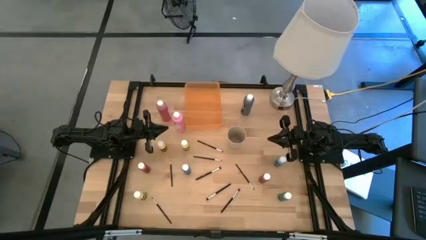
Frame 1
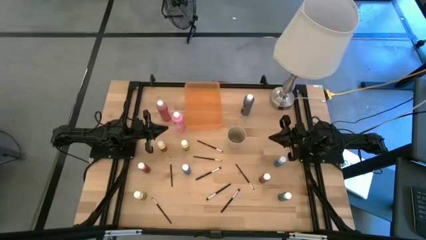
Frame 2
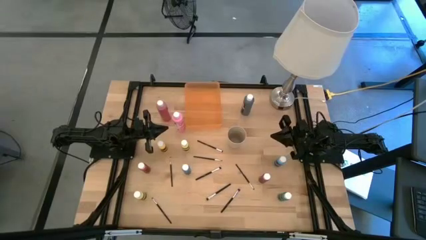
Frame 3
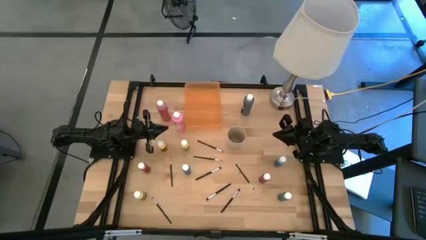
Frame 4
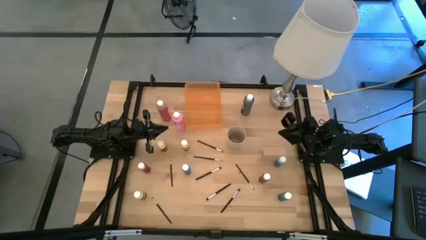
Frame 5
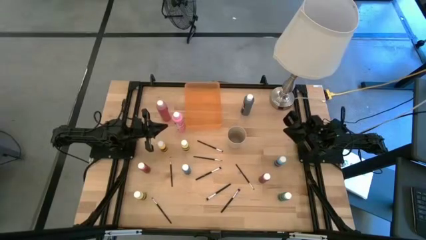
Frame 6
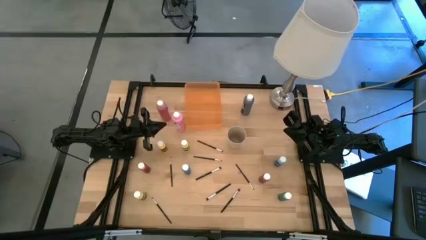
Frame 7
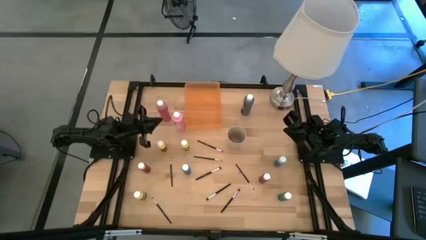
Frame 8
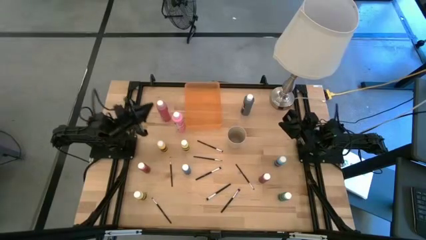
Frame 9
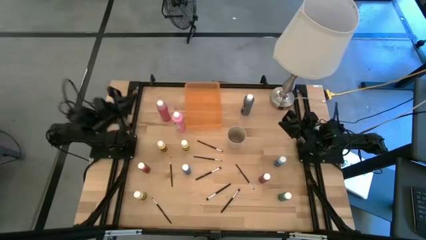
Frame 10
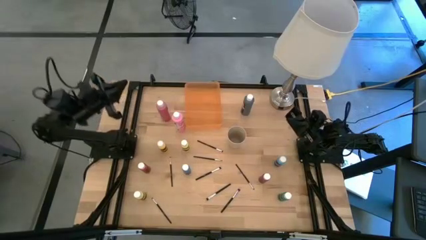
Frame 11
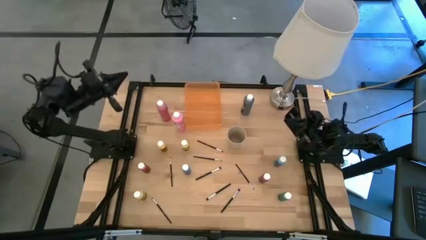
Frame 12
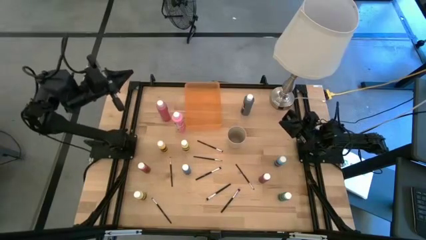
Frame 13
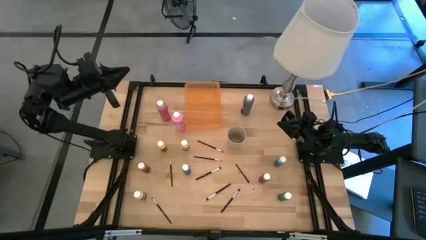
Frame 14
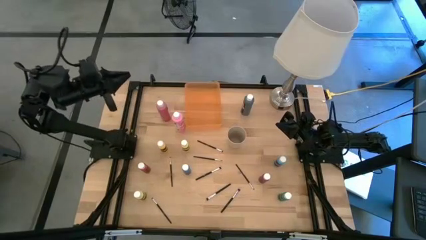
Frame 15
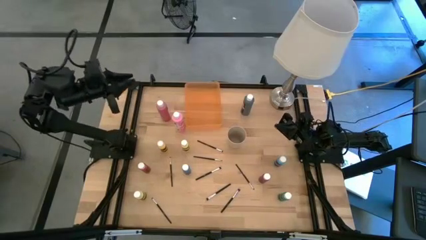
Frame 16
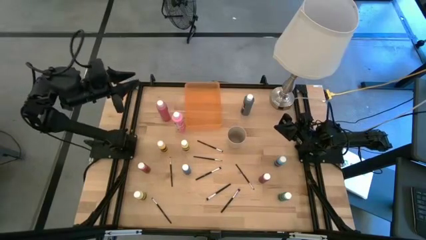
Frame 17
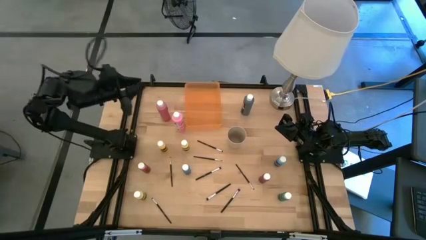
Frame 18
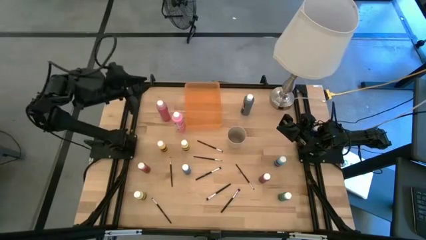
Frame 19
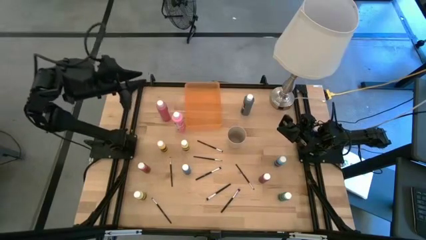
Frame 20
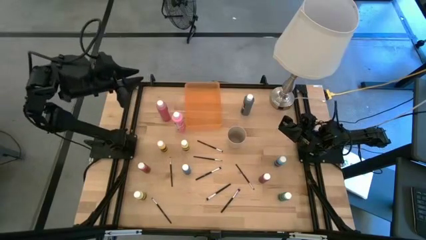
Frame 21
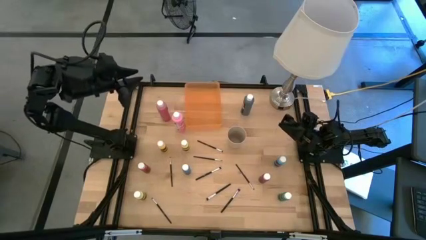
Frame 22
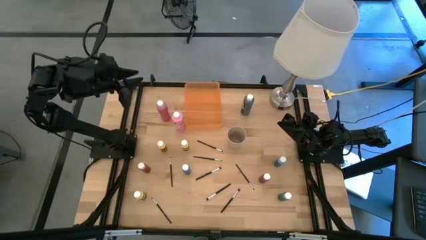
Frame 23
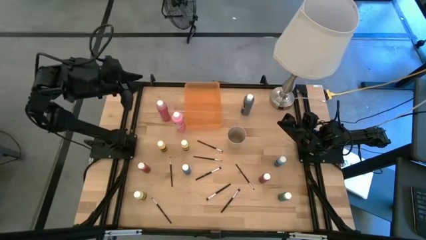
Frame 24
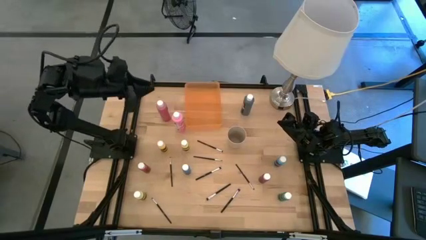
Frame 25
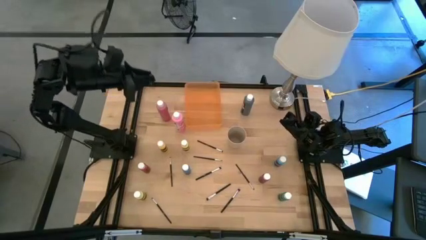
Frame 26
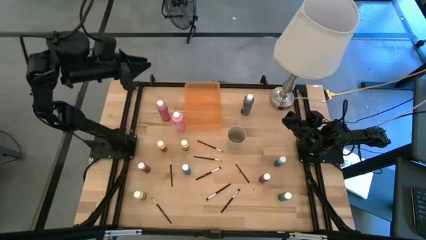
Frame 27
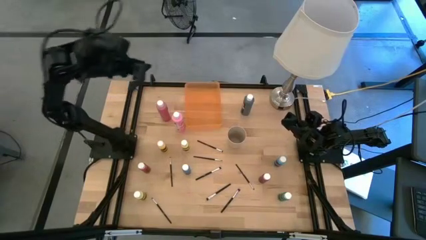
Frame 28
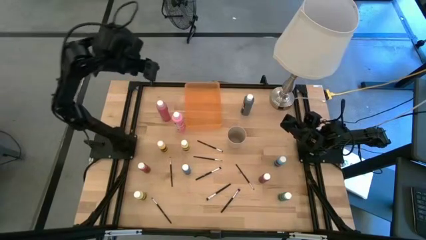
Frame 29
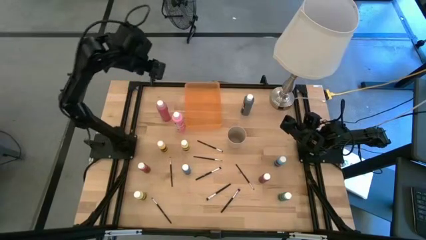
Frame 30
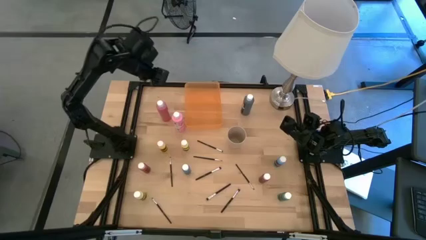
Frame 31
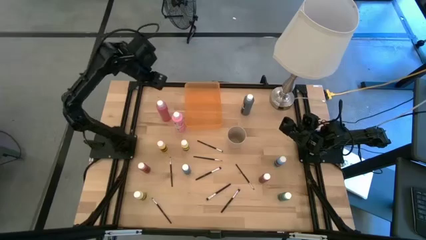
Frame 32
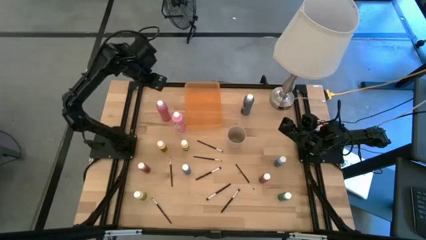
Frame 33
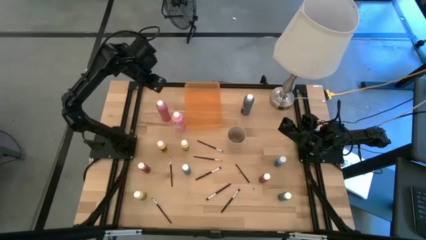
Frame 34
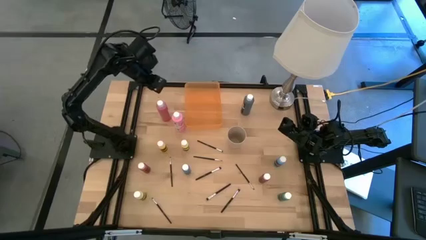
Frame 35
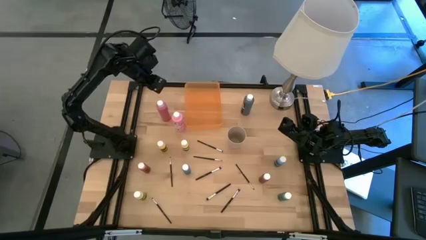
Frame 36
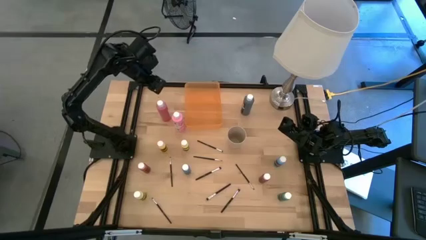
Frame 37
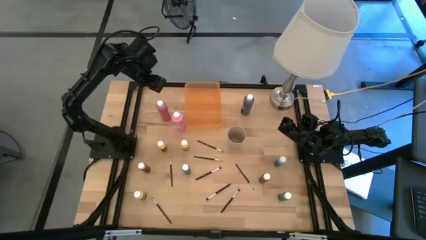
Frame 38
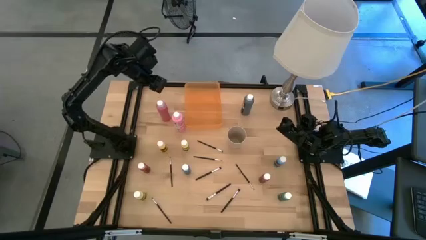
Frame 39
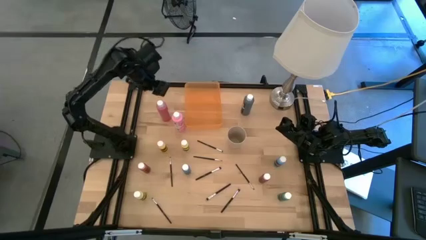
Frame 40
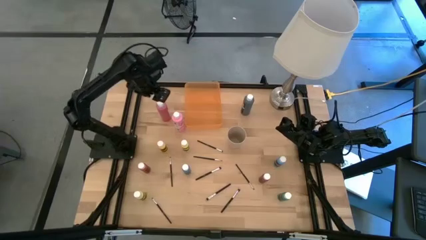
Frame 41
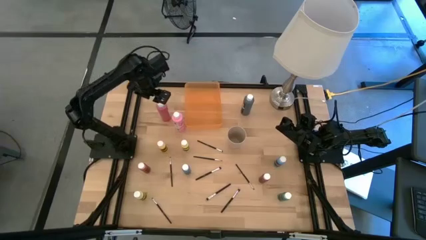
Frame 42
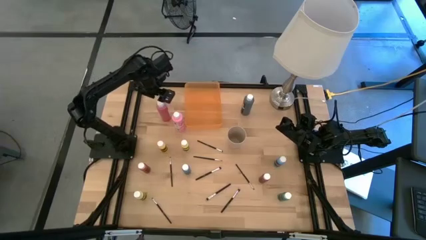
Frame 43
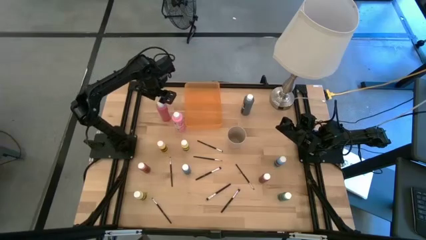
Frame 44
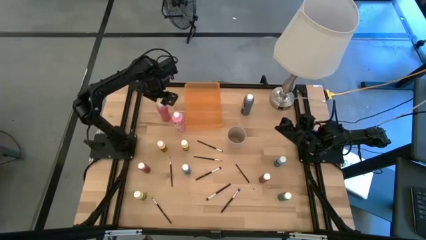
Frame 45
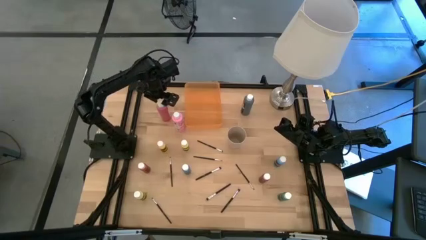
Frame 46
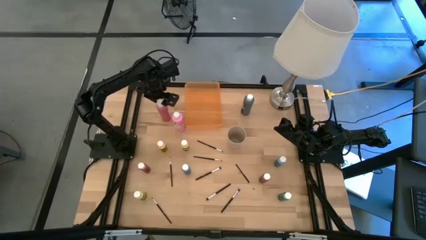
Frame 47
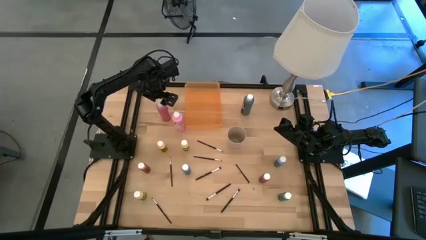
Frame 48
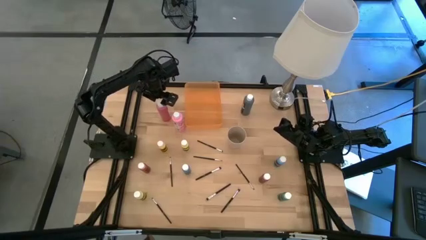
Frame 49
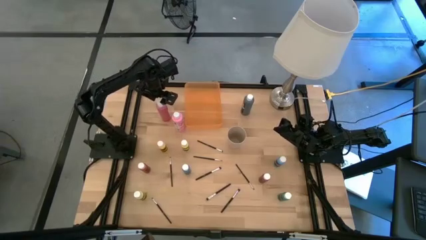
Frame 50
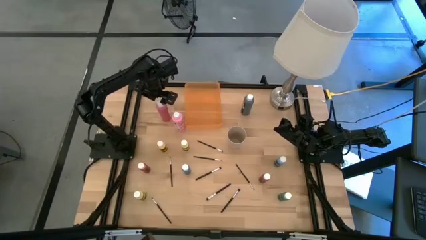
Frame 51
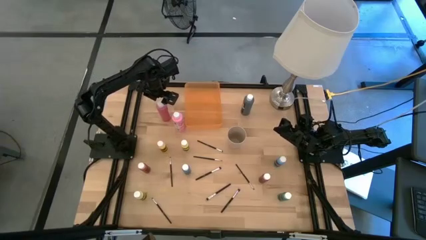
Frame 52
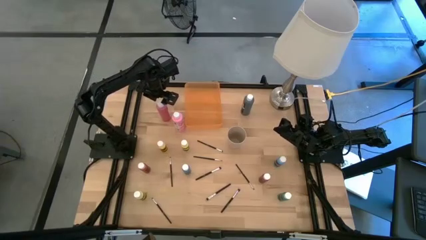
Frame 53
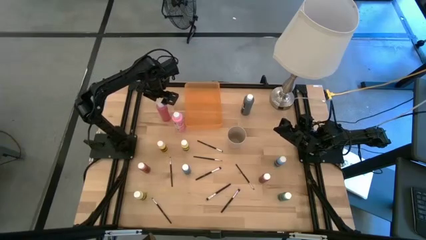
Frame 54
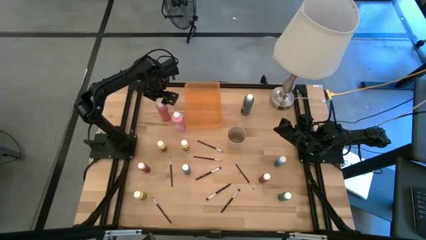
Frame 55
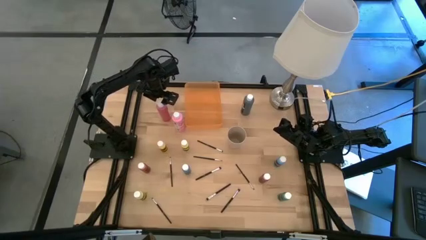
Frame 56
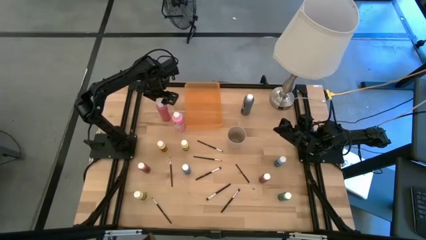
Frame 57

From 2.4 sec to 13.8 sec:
Task: Pick & Place Paint Supplies
Put the large red paint bottle into the orange bin

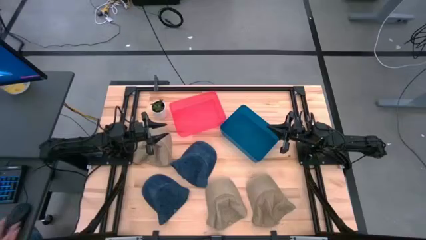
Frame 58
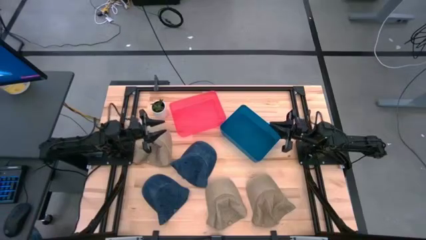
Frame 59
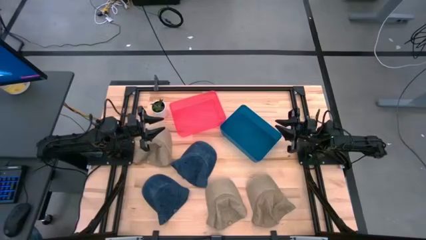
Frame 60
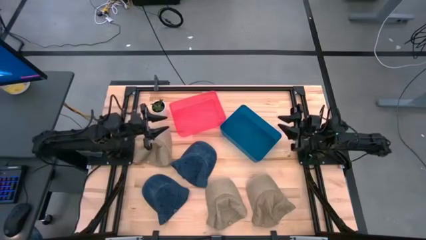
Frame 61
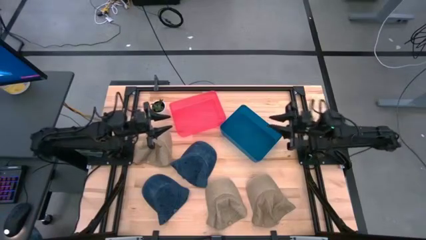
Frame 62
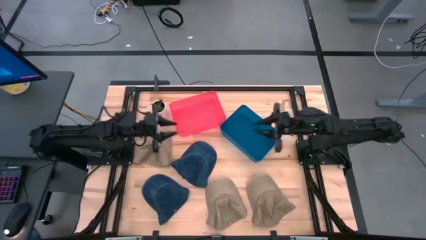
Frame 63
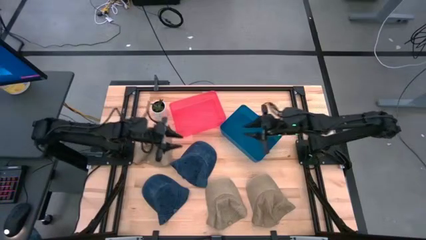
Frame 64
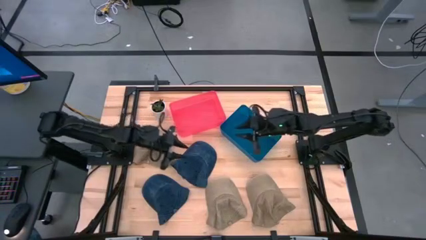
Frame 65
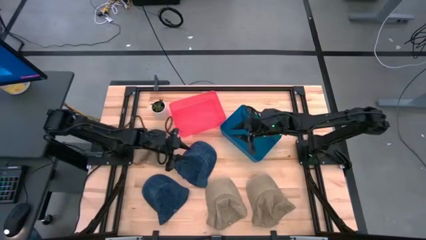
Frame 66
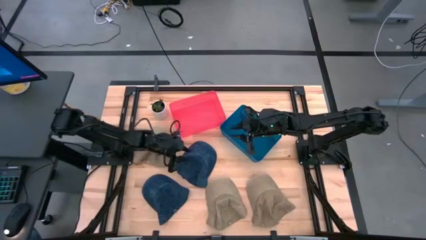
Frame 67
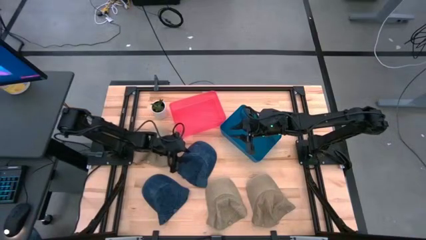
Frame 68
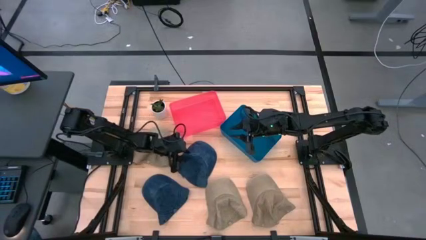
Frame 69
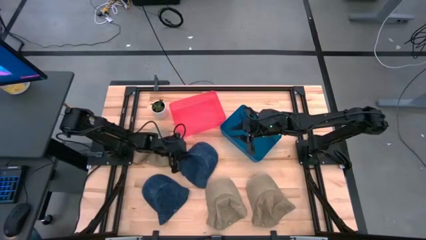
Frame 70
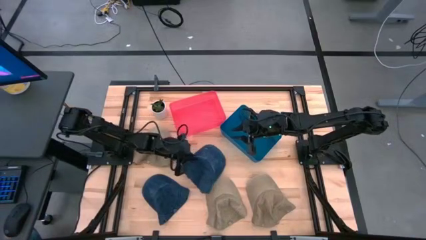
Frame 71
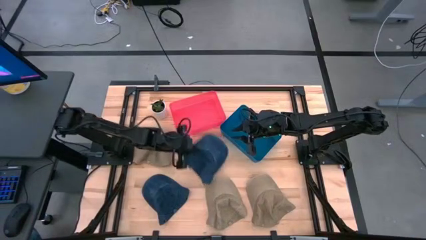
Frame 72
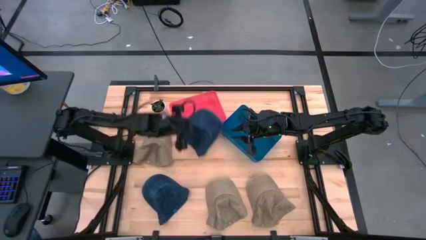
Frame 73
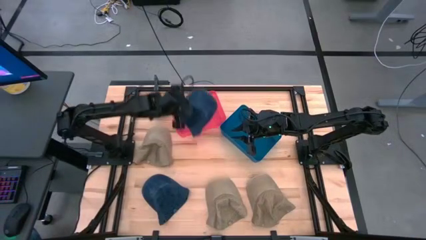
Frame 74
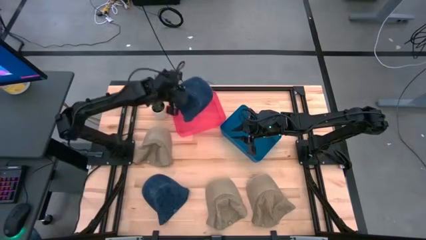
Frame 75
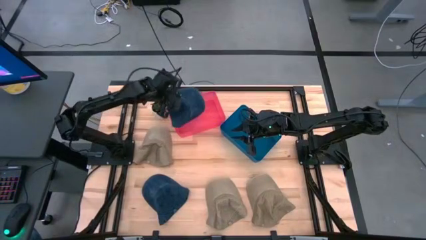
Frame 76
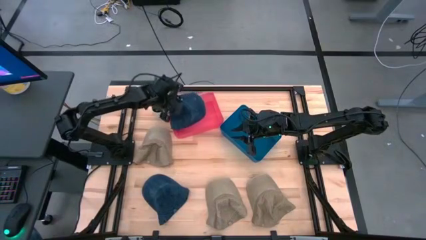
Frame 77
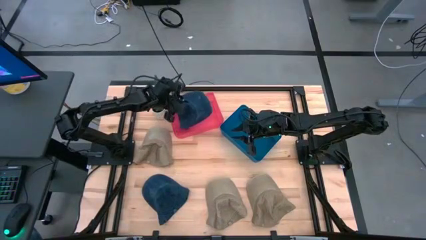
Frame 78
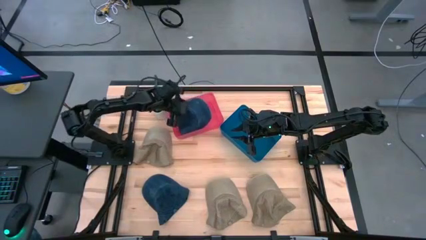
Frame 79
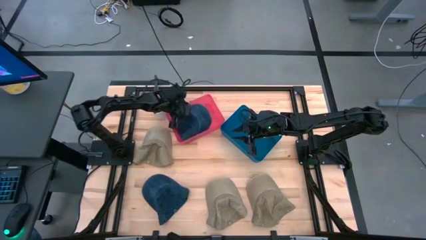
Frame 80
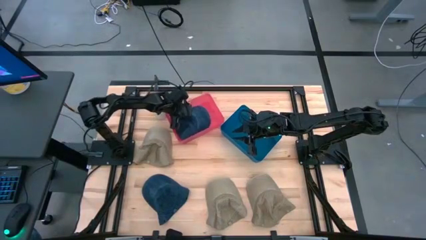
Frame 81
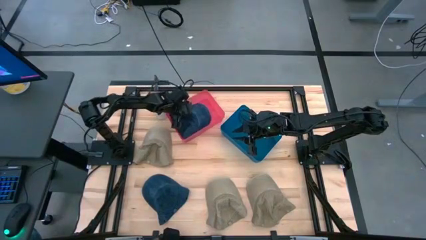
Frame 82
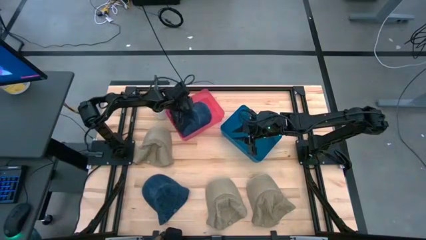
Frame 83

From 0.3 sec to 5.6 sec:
Task: Pick & Place hat
Put the top blue cap into the red bin
